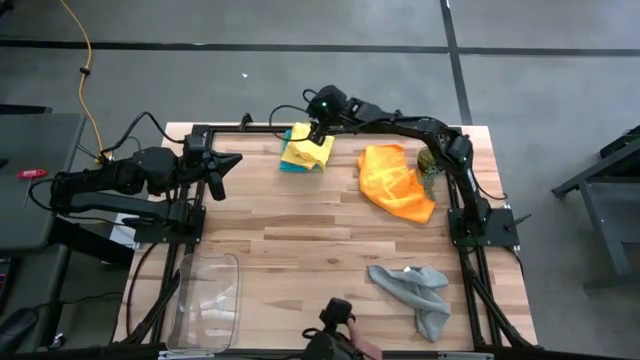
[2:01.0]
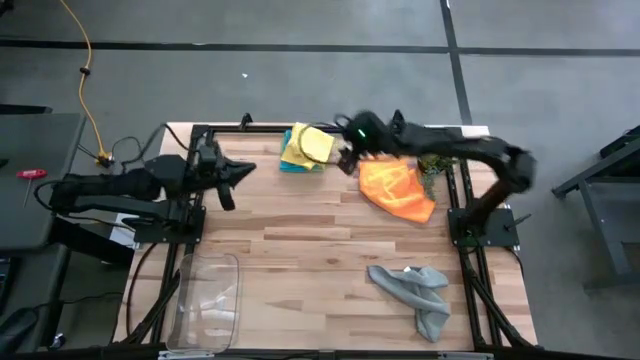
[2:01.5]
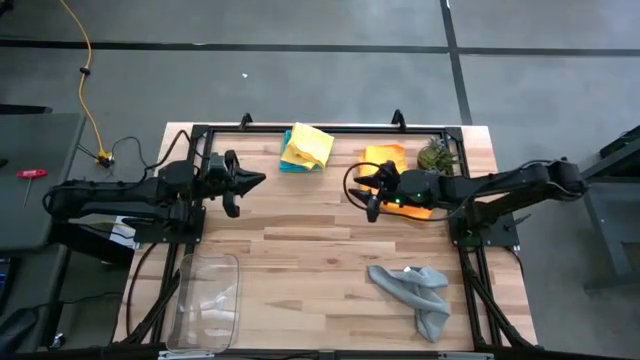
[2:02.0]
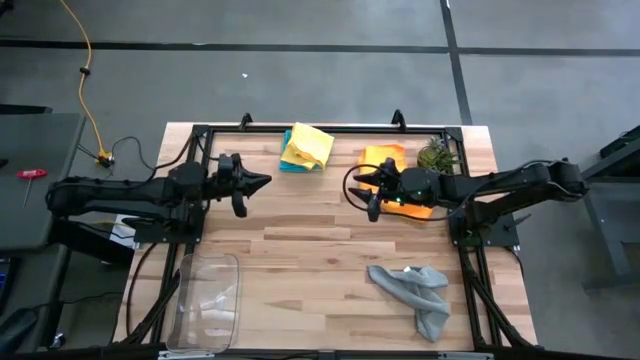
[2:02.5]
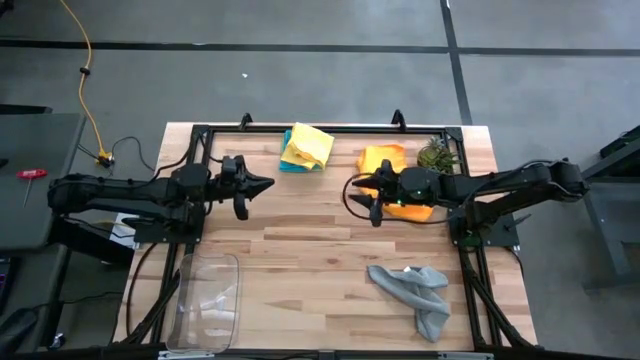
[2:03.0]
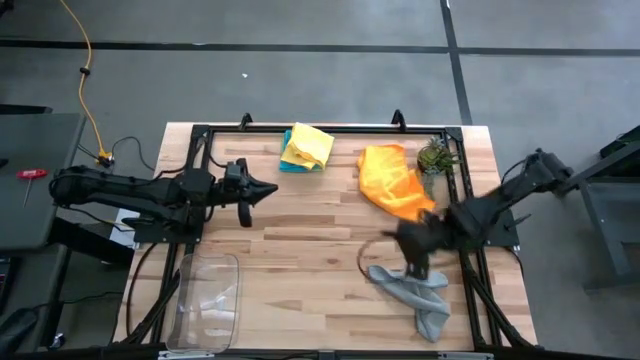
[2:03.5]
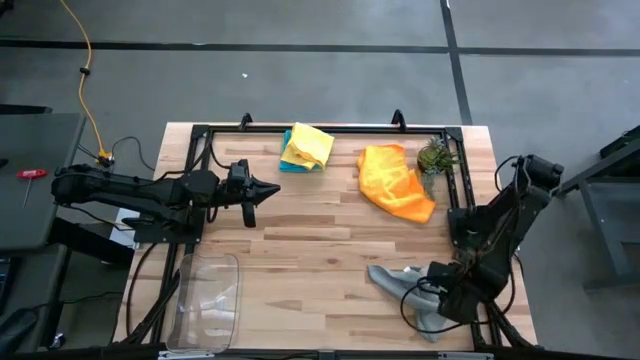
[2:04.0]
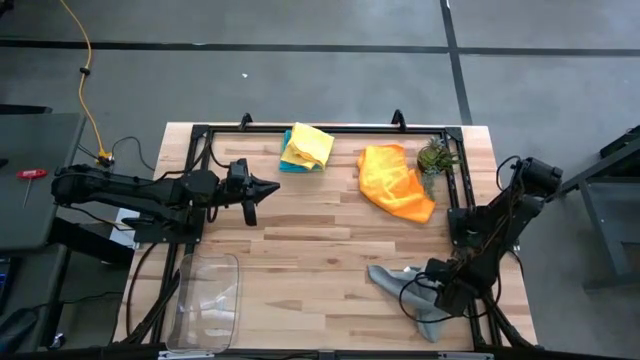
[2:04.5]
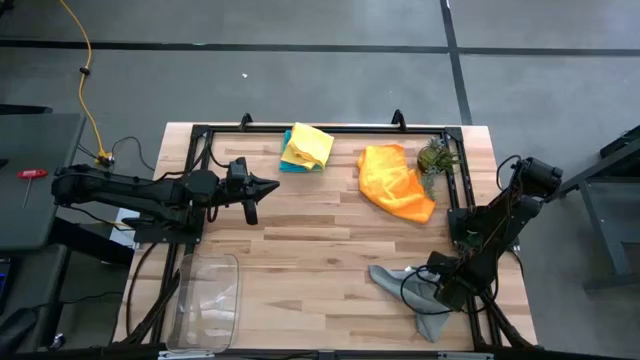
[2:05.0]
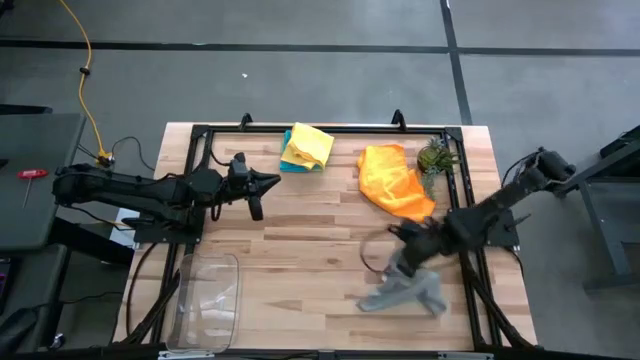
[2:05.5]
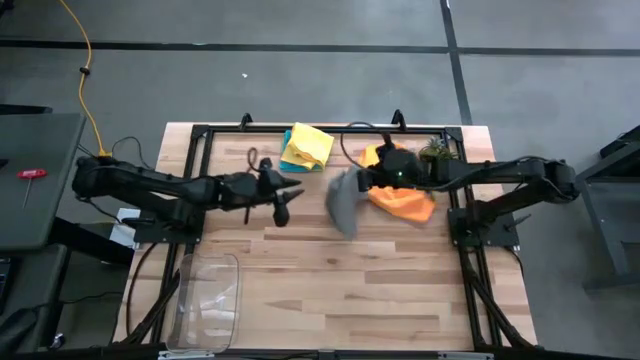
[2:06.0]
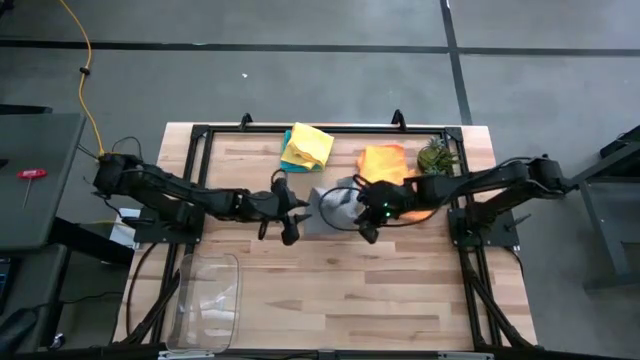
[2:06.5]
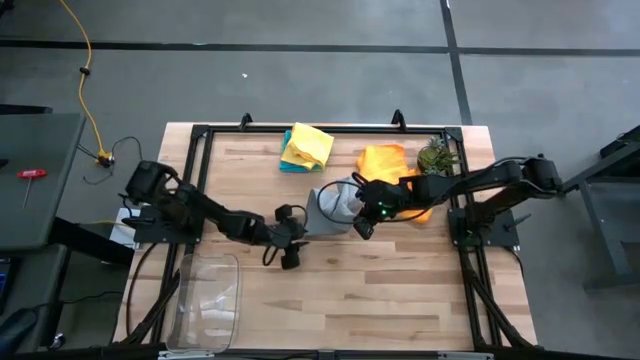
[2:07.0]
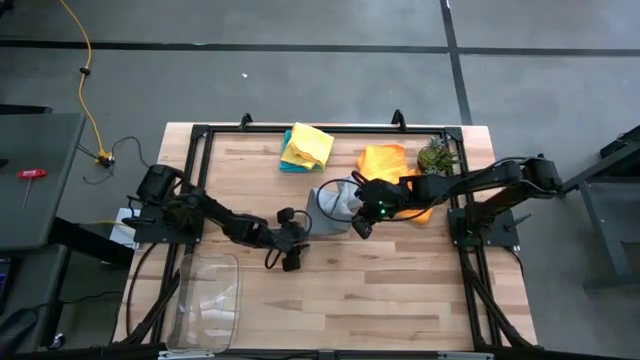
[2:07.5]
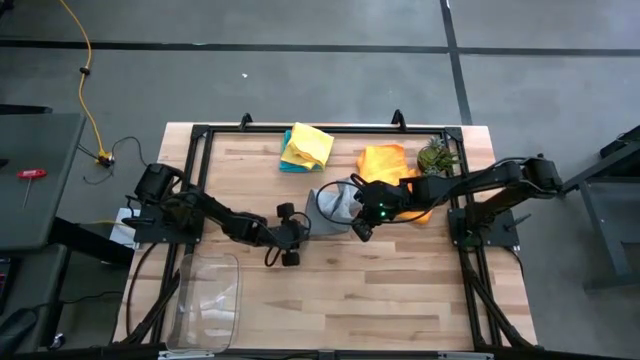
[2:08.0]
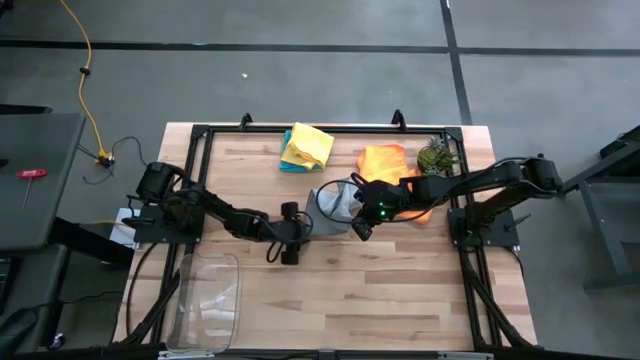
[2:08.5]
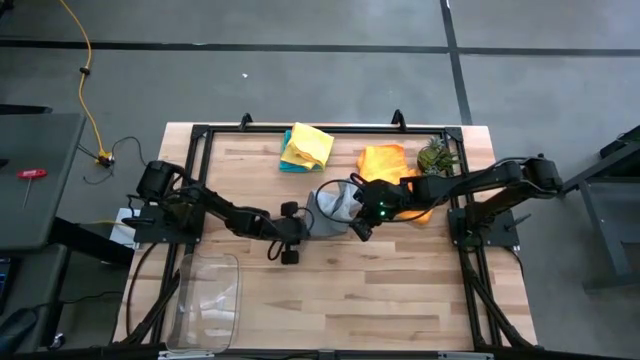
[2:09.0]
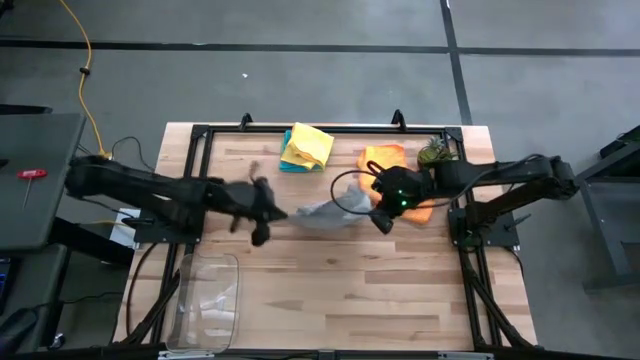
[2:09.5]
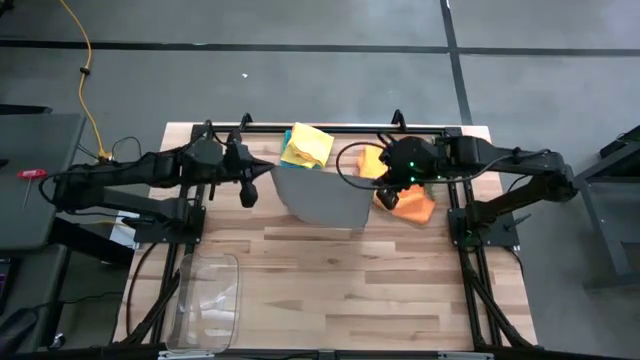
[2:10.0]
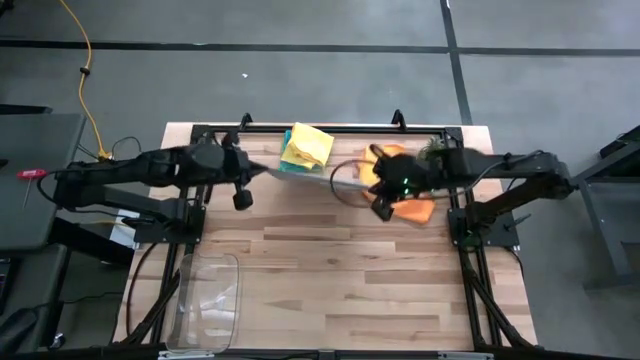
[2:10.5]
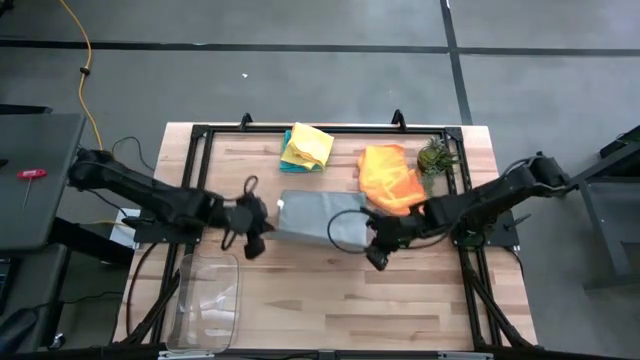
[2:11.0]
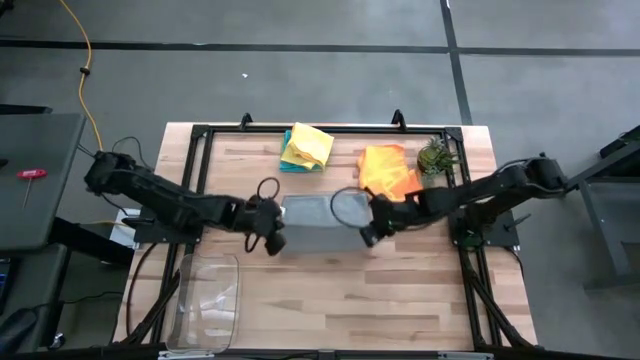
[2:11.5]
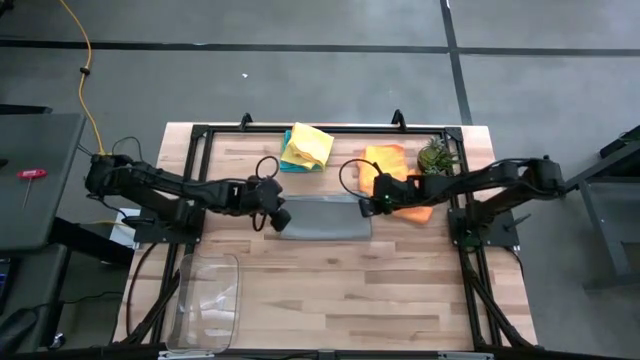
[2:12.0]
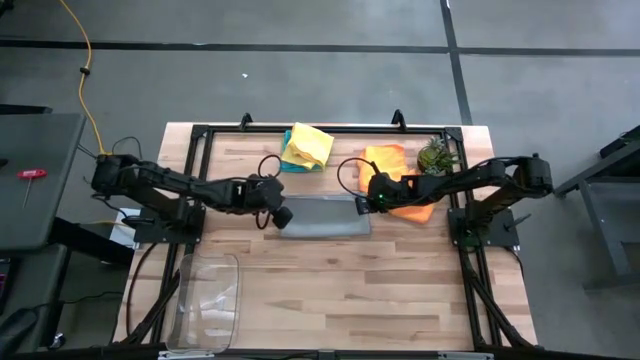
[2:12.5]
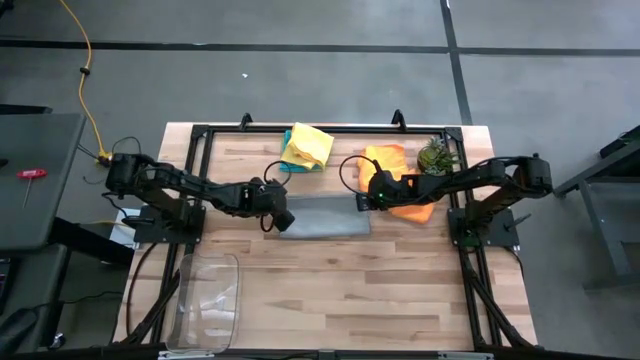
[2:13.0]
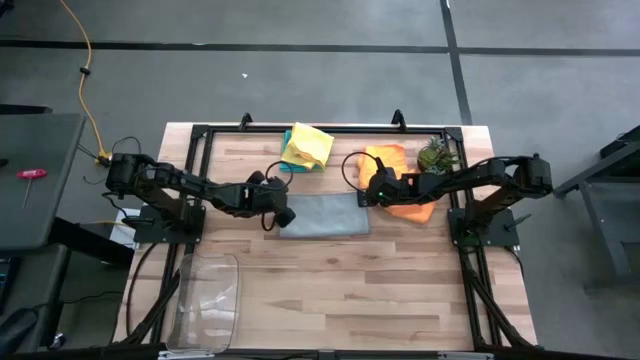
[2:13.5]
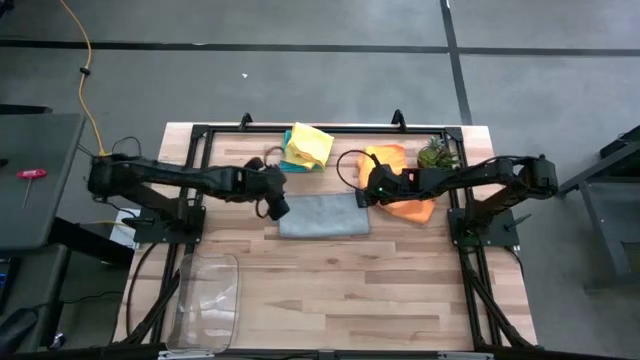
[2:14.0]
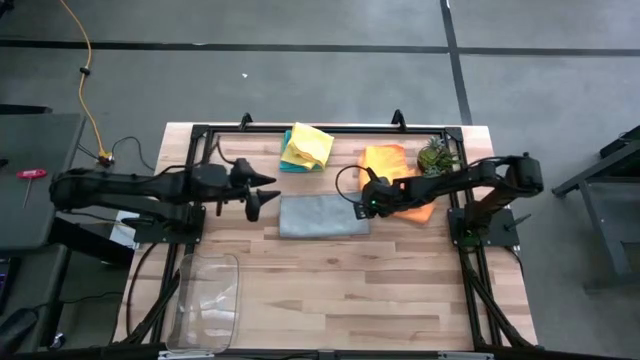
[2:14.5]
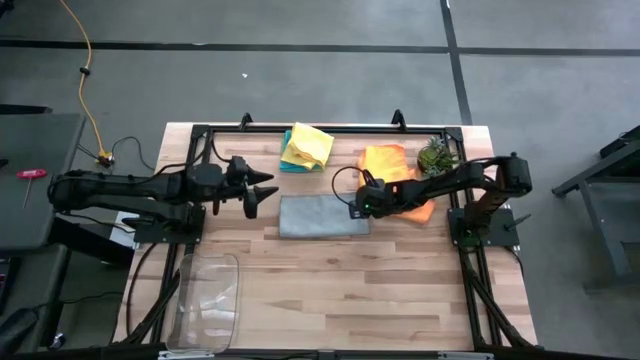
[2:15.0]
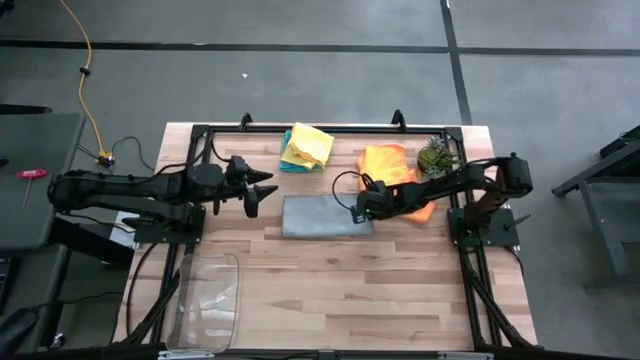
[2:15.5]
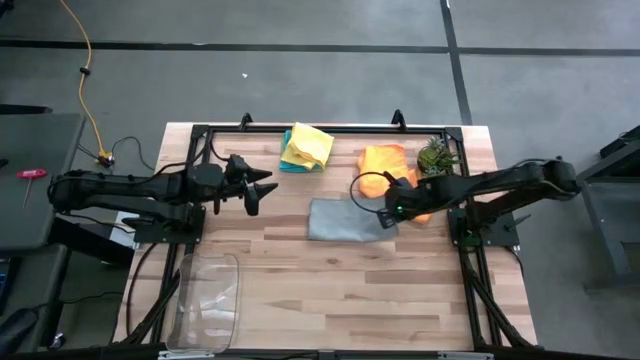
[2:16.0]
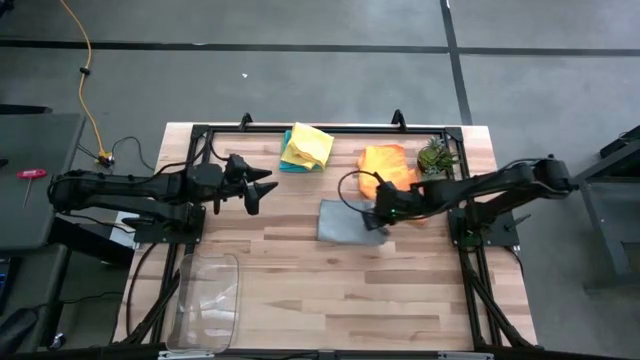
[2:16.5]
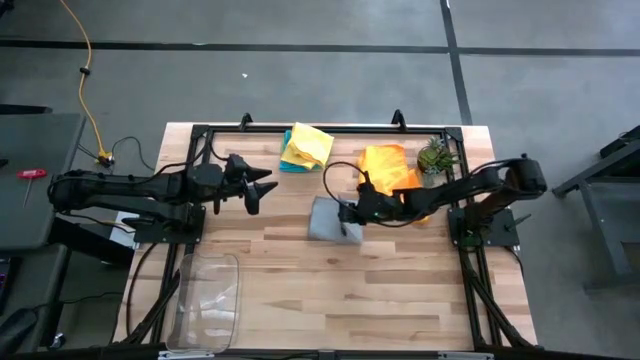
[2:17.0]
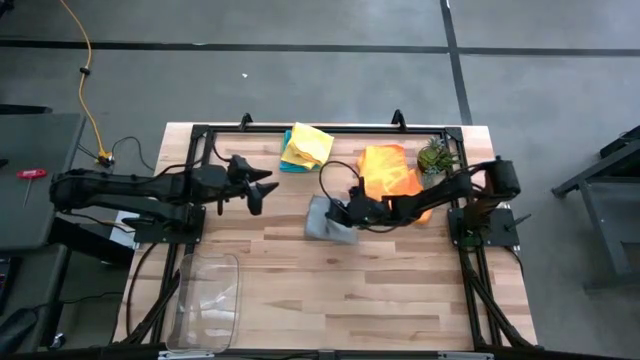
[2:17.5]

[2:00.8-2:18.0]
Task: Fold microfiber towels
Fold the gray microfiber towel

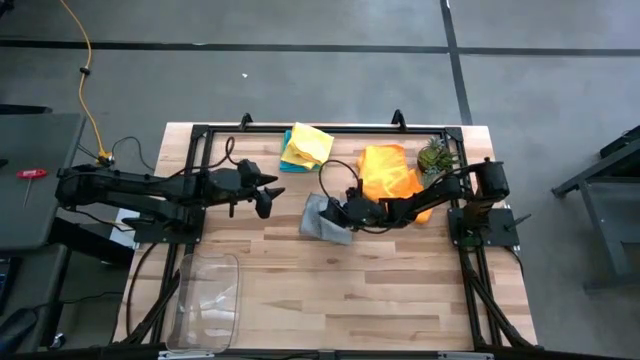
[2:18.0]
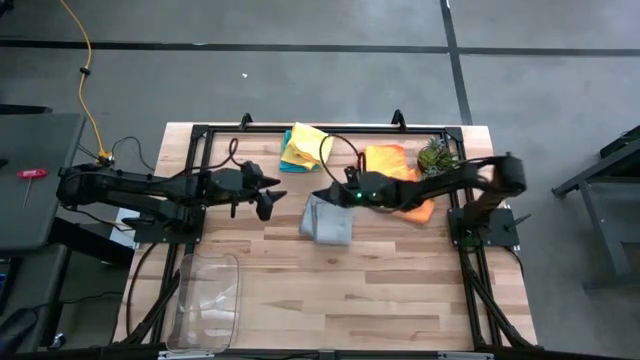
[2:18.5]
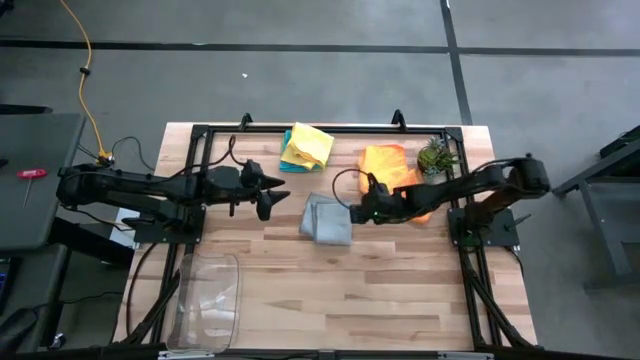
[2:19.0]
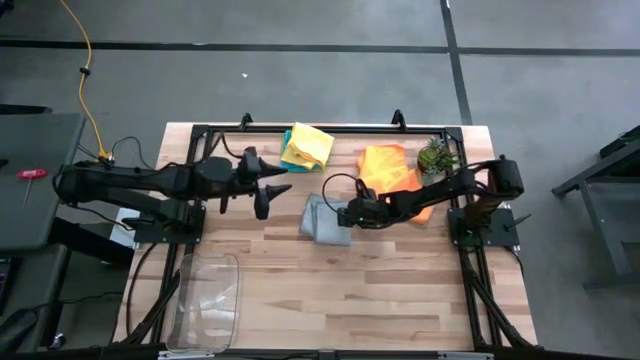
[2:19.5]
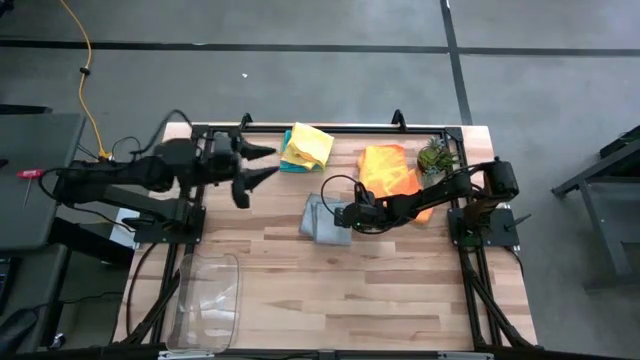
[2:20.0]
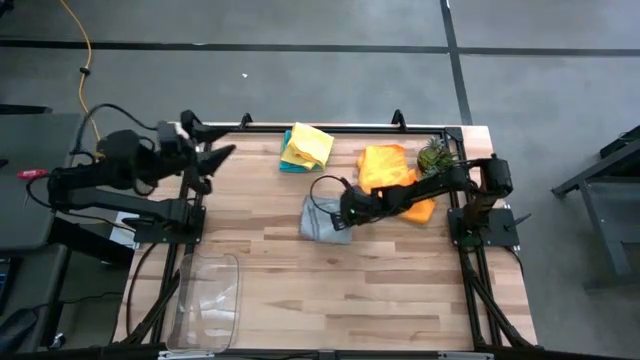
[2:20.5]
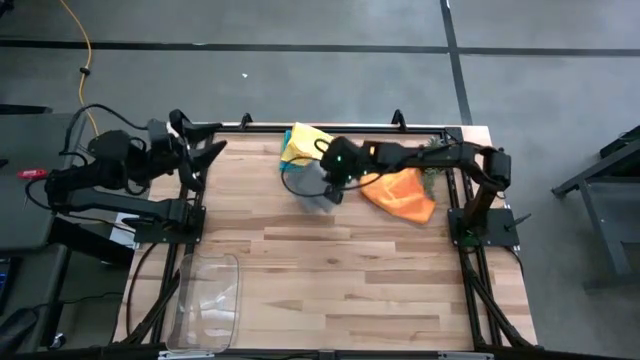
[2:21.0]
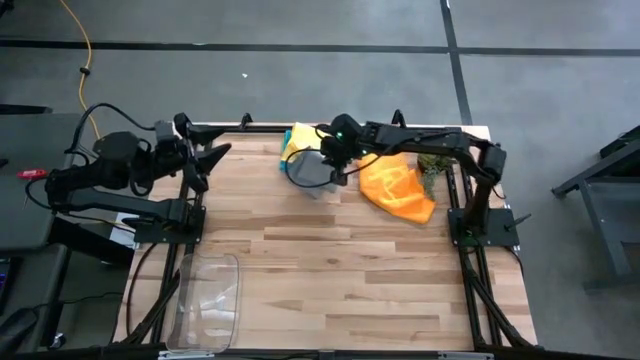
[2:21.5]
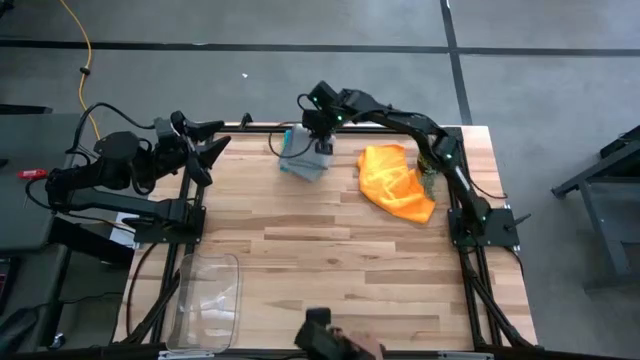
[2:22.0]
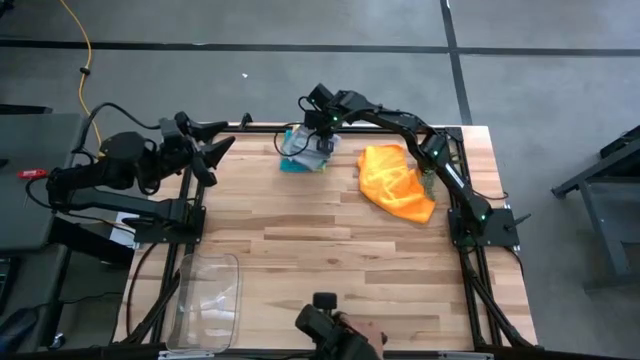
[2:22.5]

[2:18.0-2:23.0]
Stack the gray microfiber towel on the folded microfiber towels
